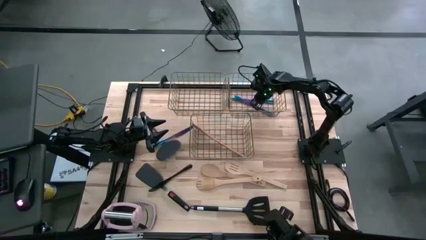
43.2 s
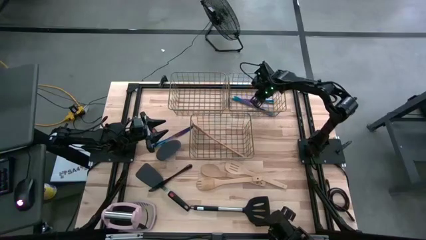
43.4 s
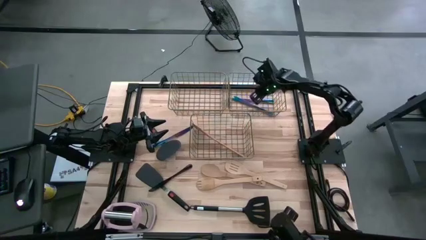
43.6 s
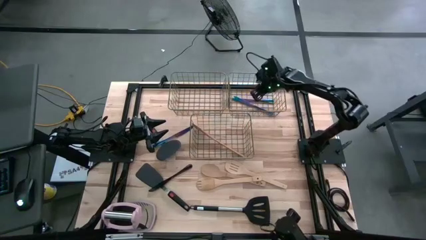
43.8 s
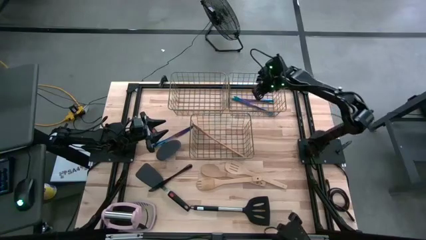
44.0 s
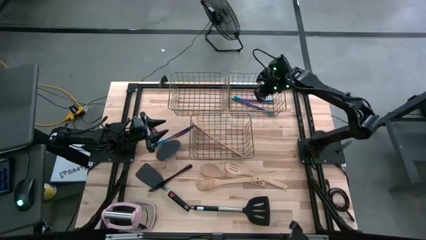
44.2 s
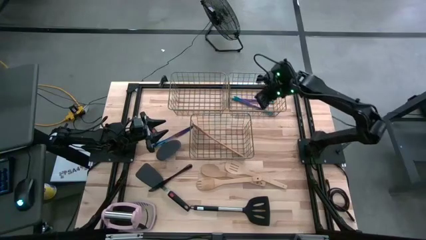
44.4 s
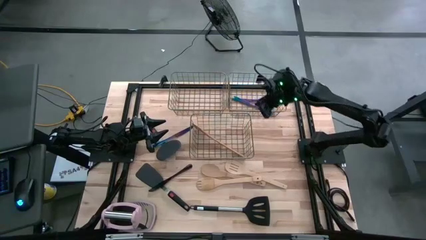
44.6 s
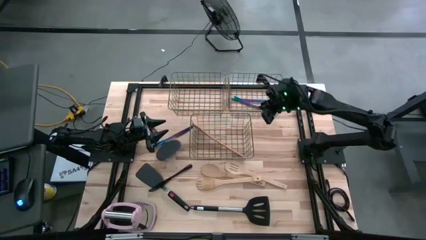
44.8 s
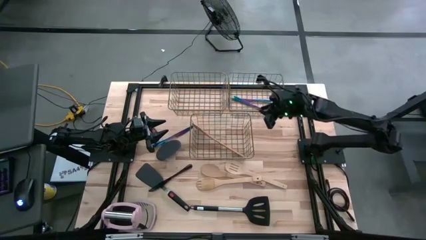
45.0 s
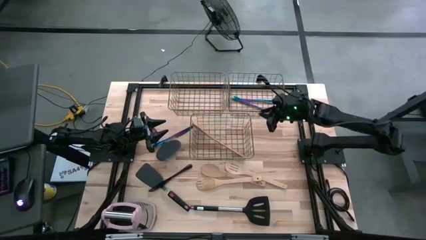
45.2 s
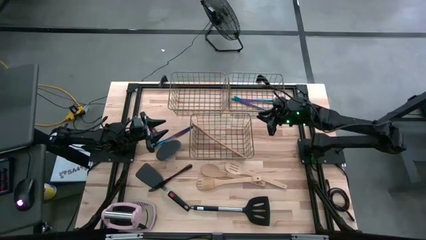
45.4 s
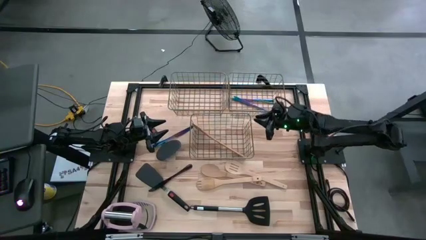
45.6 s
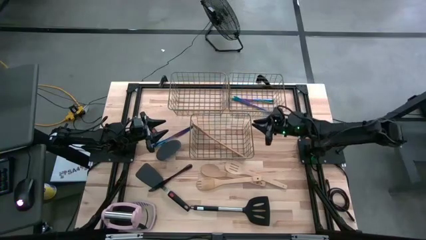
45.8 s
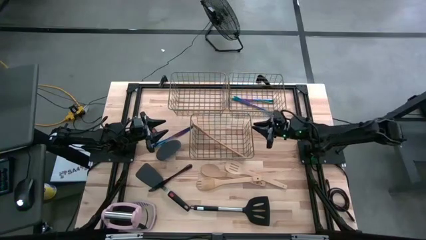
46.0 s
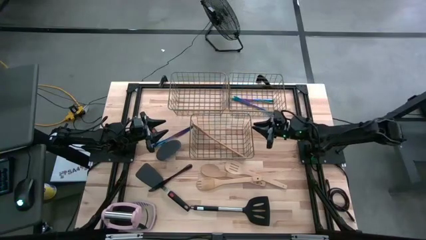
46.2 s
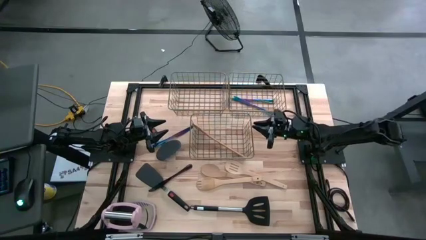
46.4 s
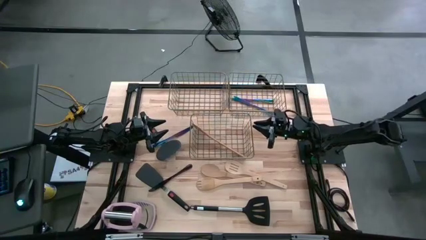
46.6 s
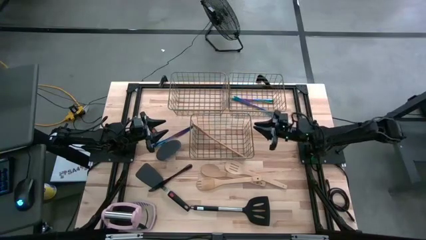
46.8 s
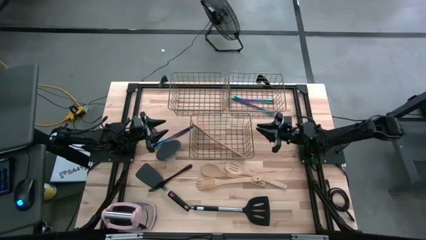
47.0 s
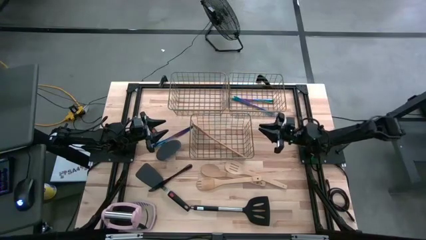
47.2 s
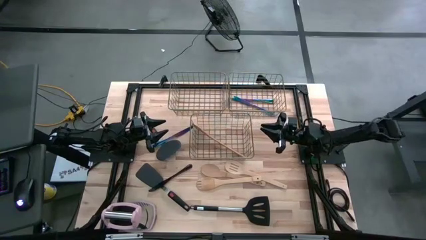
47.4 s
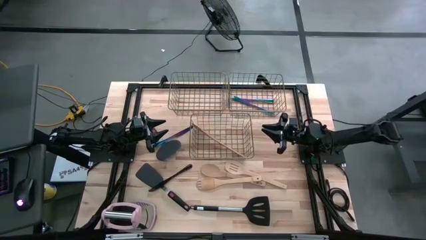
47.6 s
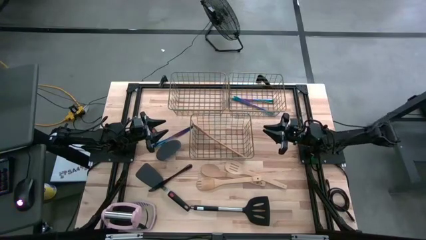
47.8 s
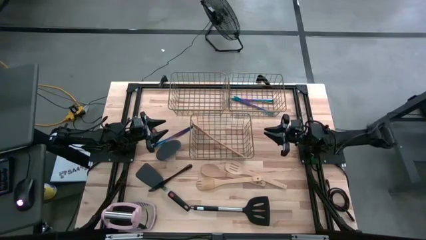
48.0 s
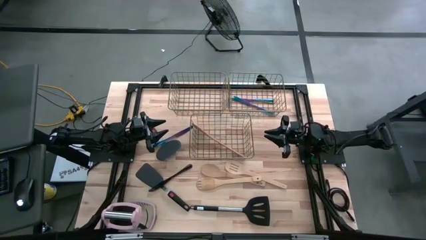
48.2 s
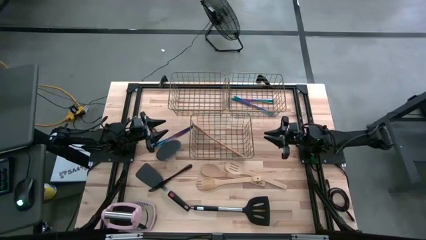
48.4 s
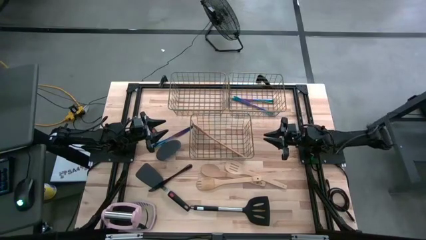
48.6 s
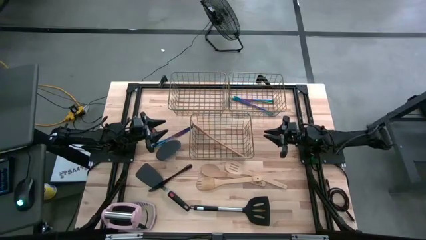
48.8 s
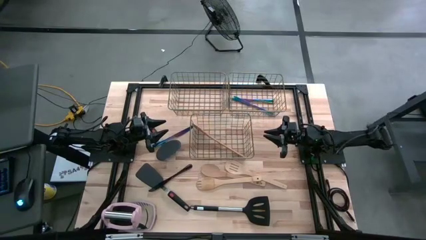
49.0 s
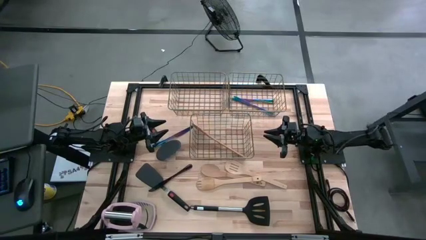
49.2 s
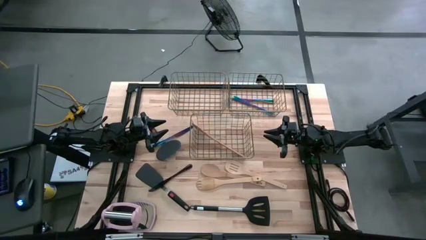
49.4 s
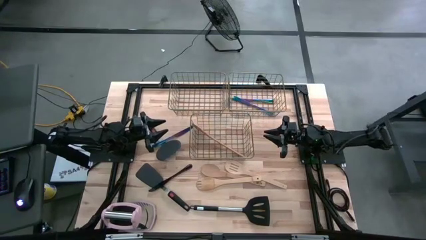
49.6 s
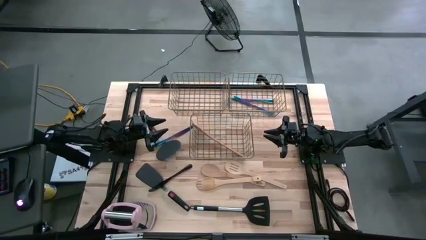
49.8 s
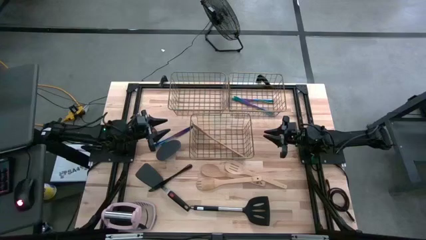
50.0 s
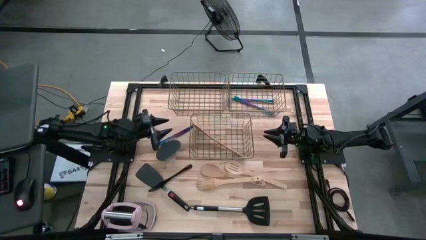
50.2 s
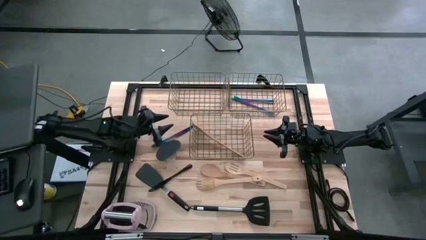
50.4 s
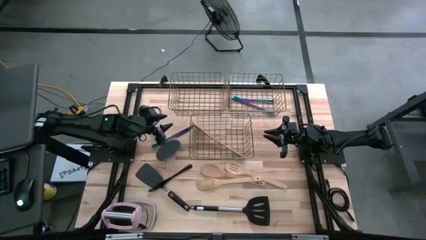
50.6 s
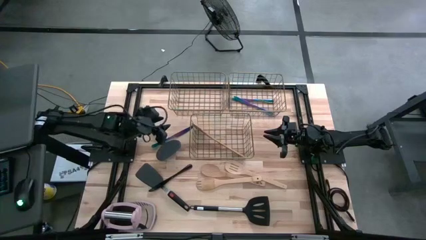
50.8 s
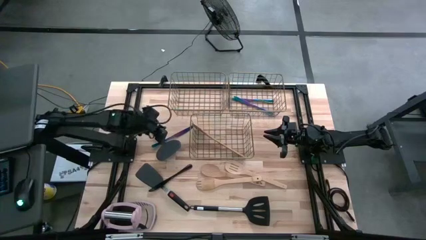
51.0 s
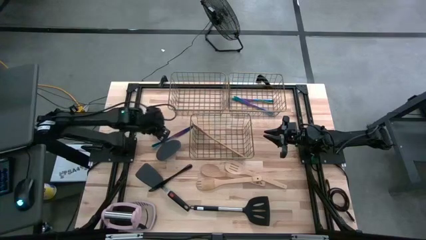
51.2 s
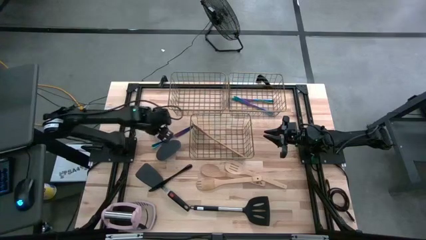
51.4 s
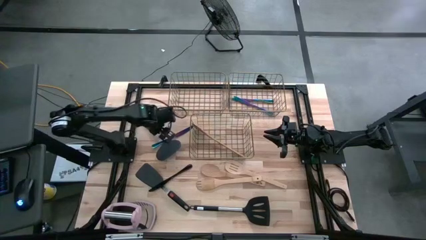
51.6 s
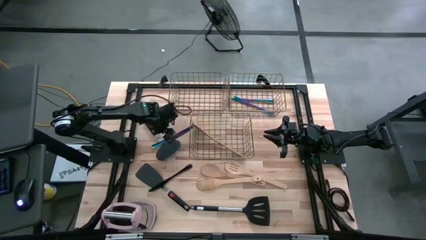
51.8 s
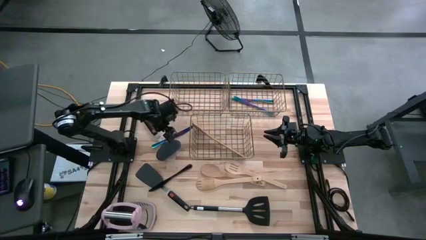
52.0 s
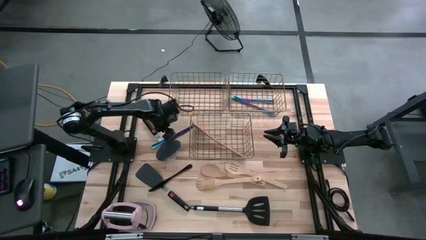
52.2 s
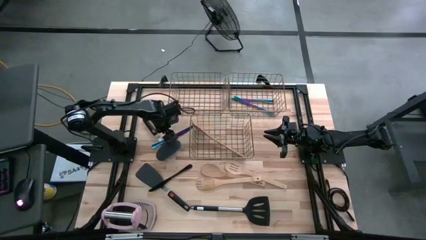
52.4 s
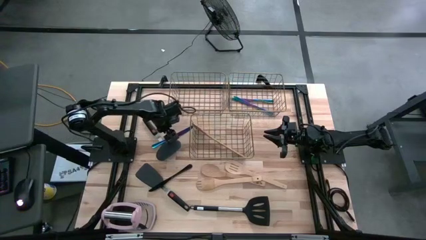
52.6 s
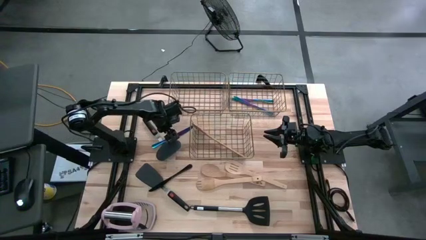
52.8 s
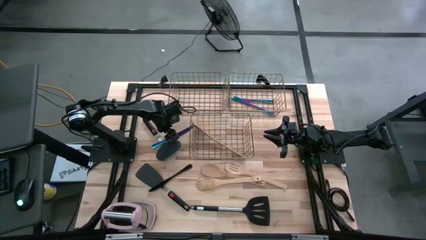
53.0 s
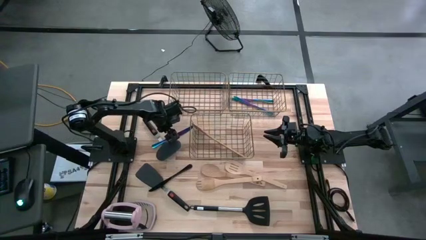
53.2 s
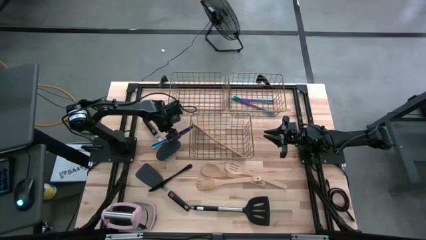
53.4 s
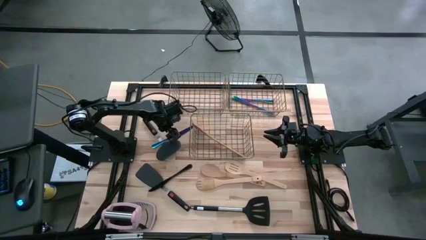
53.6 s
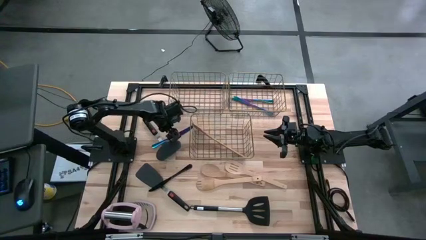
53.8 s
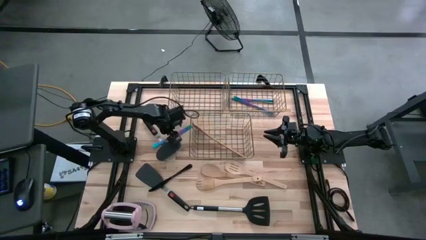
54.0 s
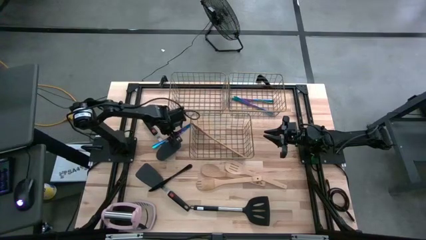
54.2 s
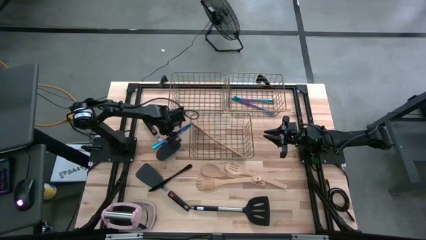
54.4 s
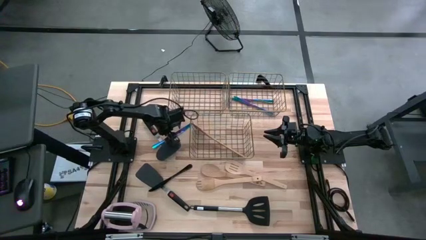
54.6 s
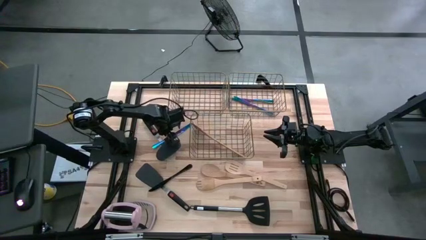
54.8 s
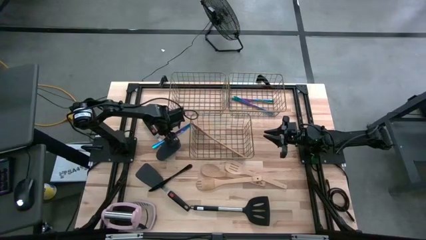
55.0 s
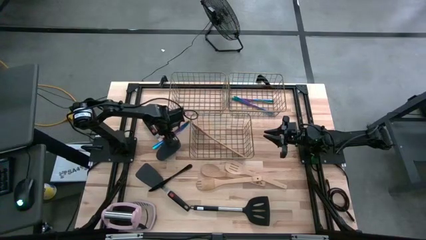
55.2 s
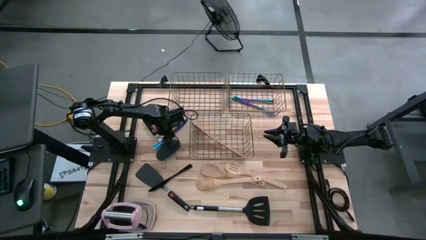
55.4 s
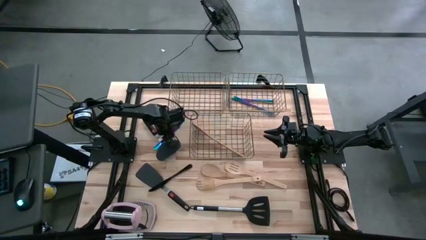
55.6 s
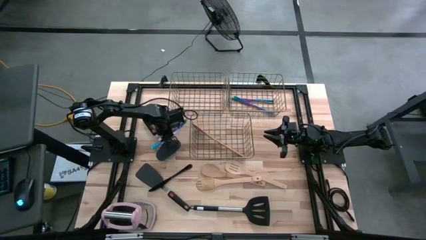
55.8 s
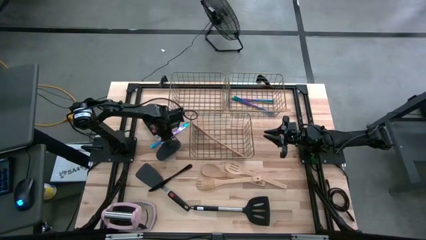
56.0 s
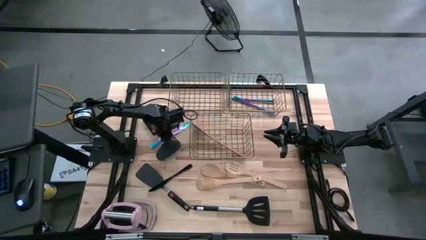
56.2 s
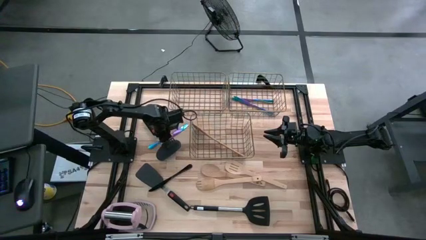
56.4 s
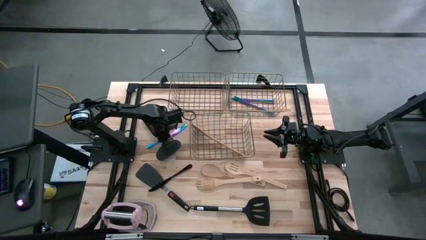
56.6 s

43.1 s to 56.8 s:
Task: Pick & Place Kitchen Items
Put the blue table knife into the top right wire basket
